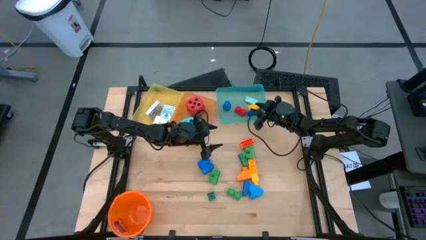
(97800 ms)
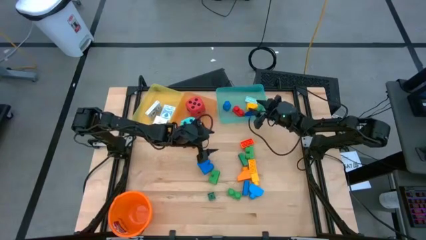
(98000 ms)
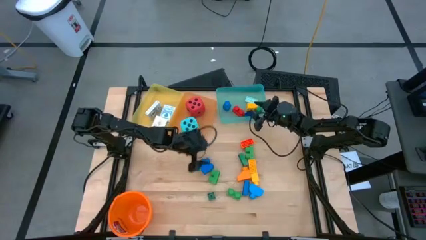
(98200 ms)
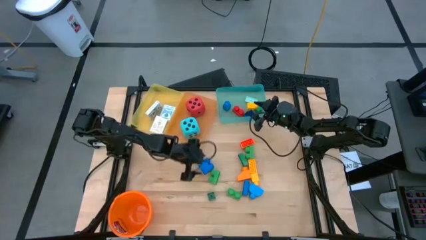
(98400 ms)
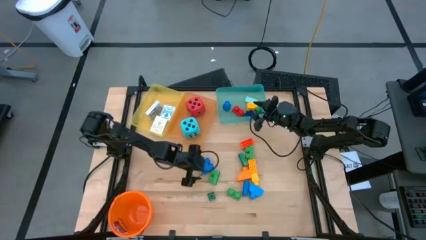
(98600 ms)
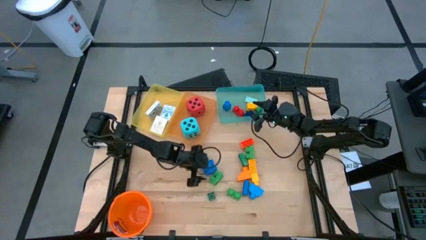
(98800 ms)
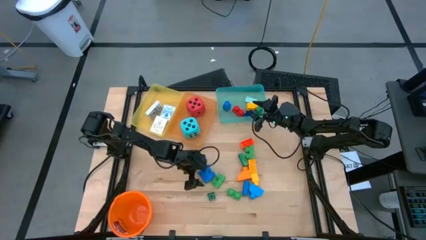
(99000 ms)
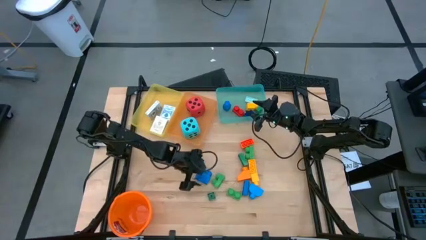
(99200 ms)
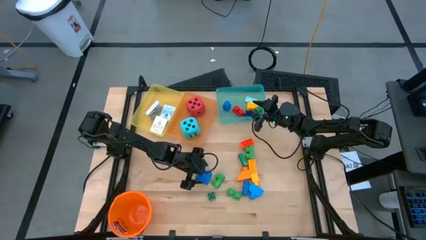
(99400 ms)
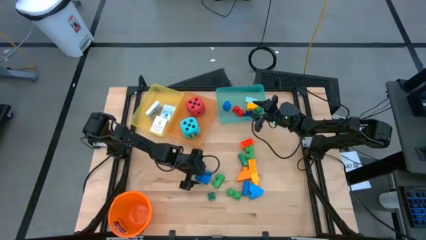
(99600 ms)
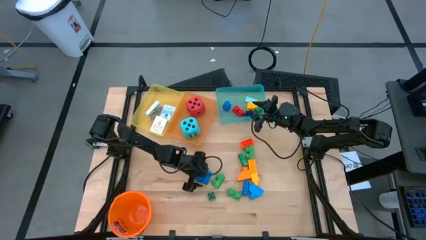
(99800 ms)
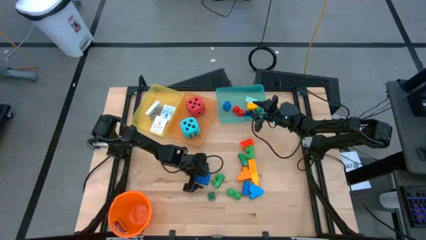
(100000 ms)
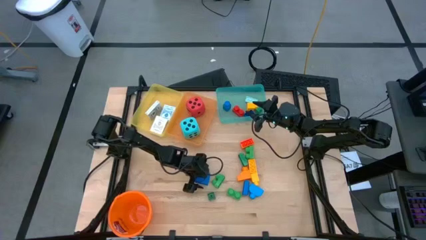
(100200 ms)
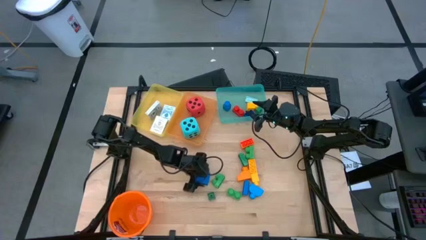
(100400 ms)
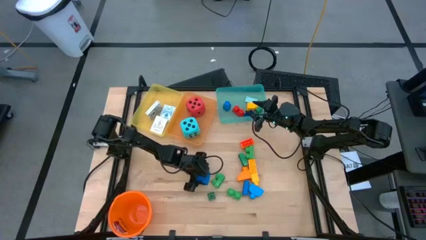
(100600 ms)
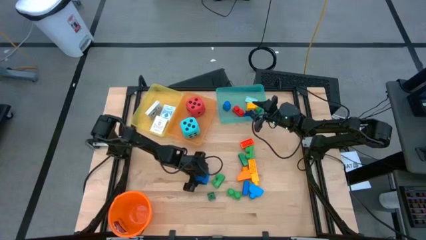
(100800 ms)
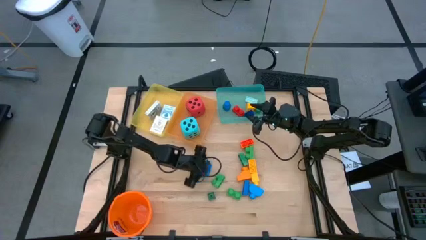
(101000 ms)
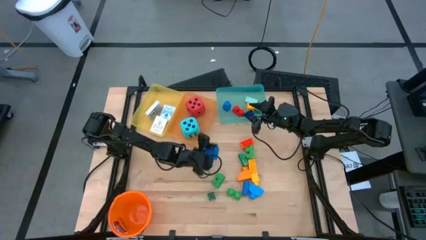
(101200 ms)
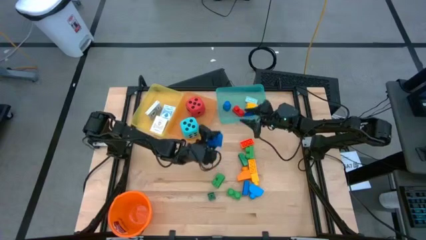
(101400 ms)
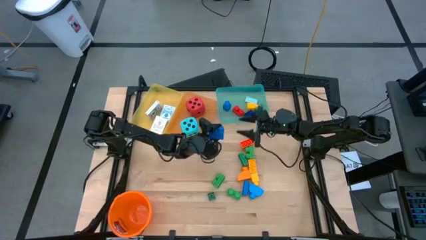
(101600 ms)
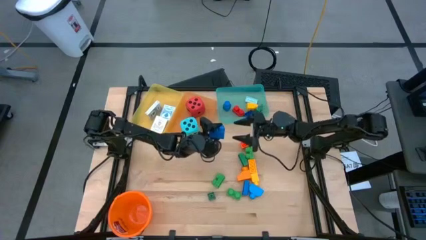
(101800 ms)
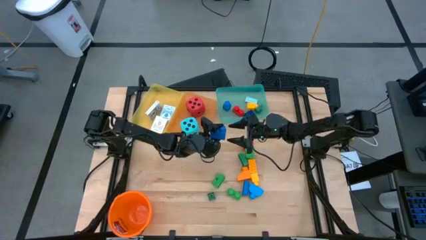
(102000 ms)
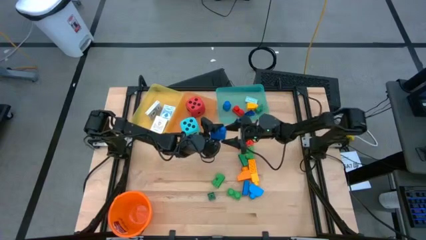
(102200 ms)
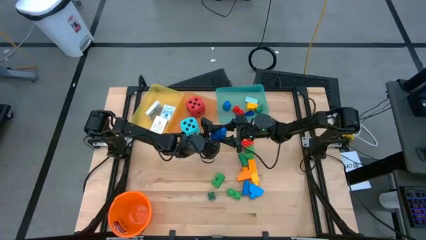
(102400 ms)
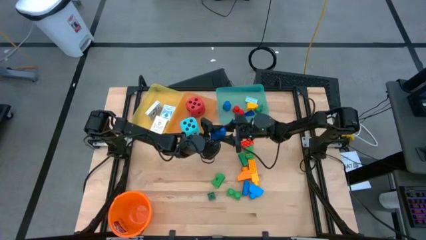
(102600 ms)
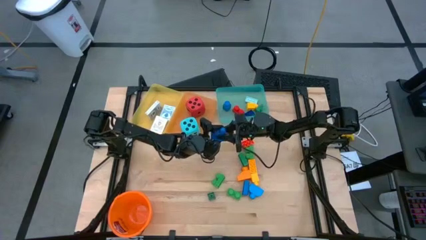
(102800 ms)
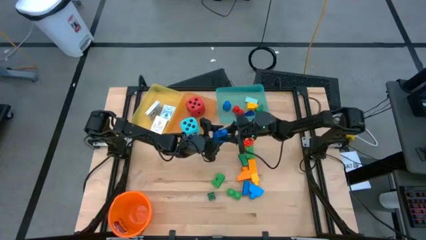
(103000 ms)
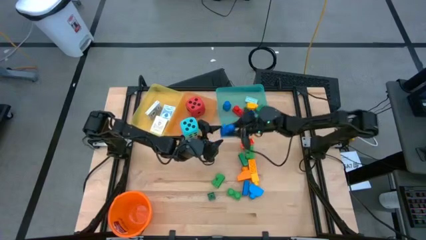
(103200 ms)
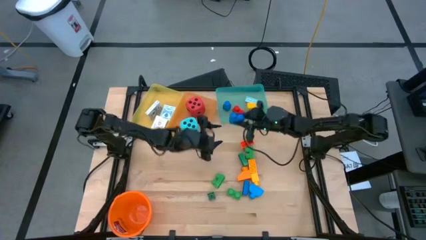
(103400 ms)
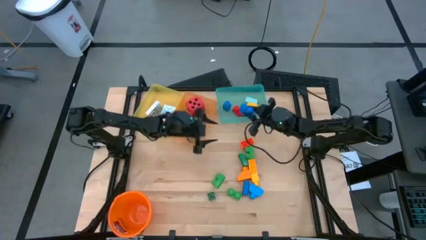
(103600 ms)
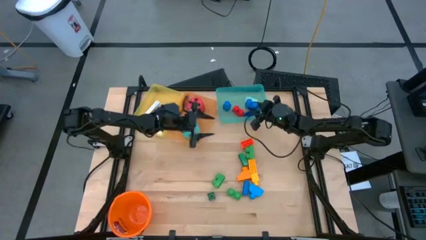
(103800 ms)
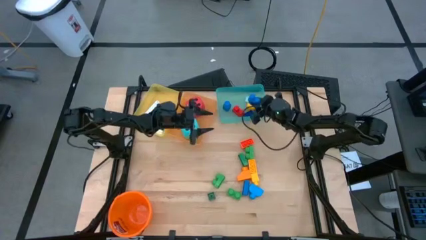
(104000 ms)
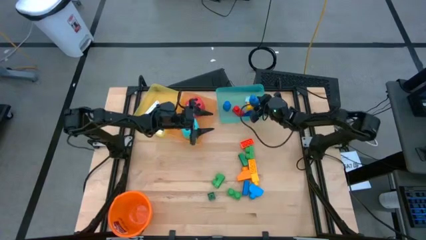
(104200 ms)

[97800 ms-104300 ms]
Task: Pick & Place Toys
Put the blue game piece into the blue bin

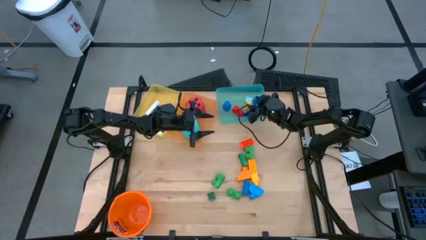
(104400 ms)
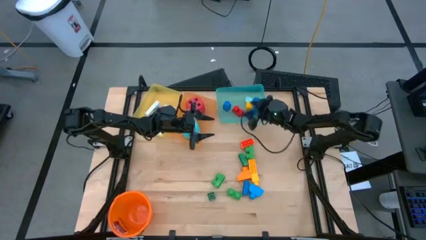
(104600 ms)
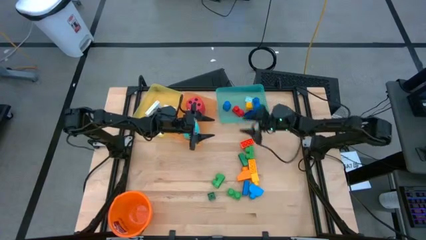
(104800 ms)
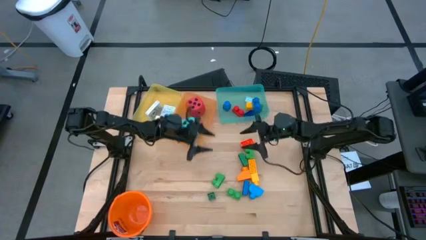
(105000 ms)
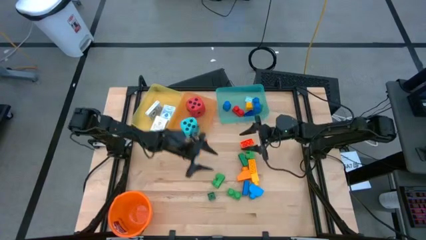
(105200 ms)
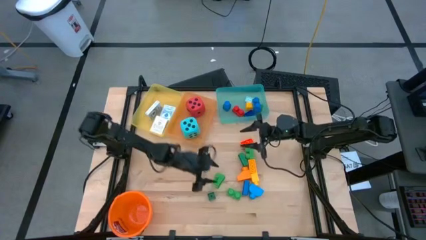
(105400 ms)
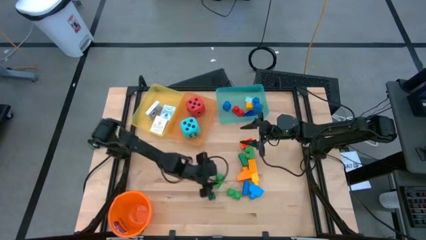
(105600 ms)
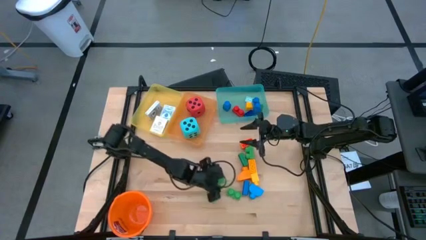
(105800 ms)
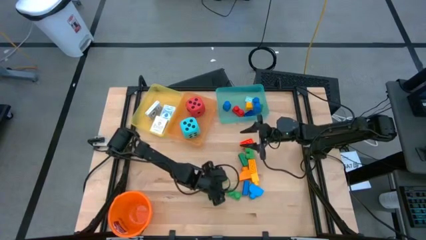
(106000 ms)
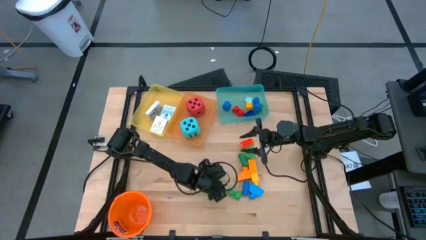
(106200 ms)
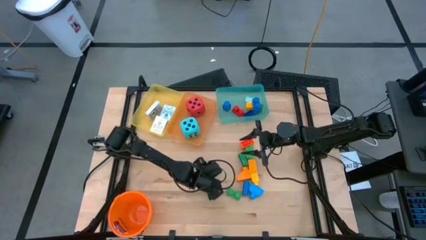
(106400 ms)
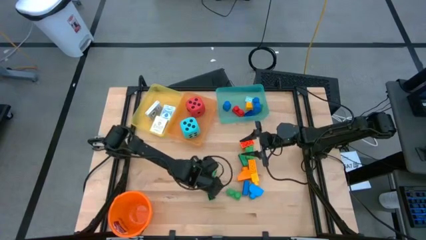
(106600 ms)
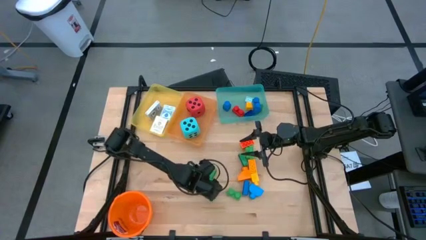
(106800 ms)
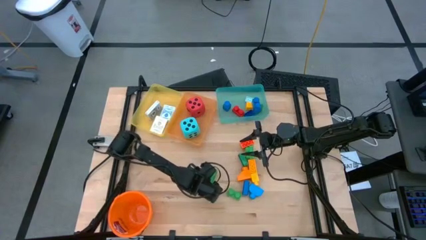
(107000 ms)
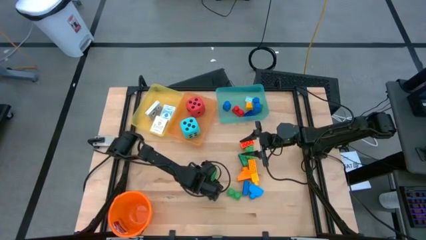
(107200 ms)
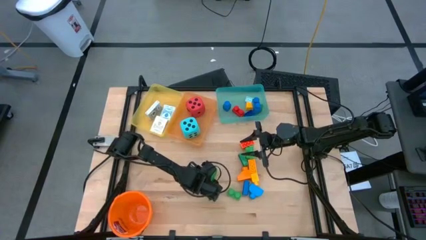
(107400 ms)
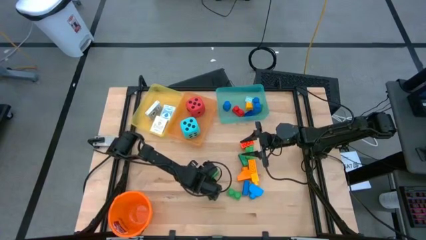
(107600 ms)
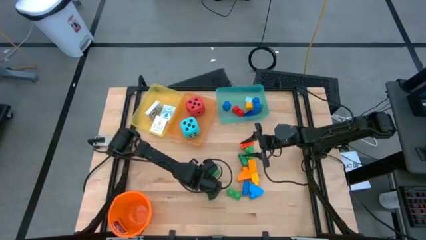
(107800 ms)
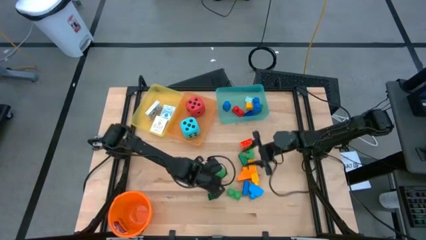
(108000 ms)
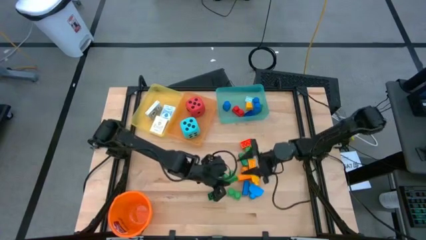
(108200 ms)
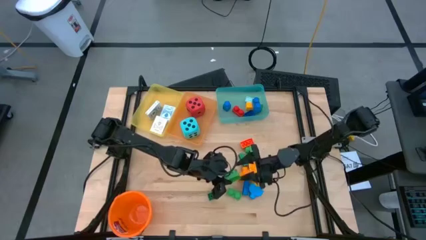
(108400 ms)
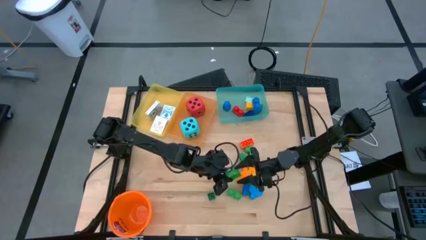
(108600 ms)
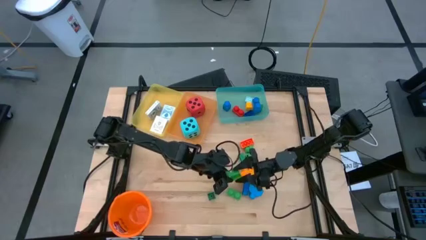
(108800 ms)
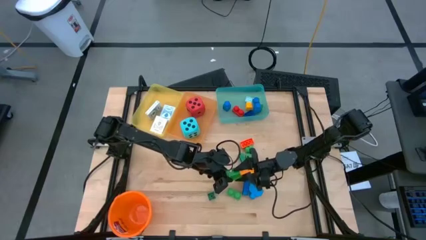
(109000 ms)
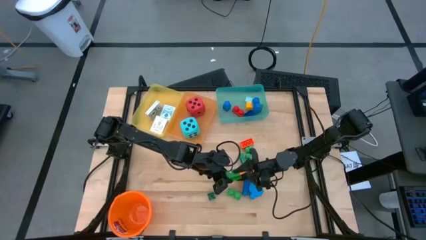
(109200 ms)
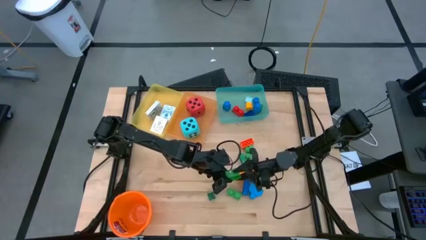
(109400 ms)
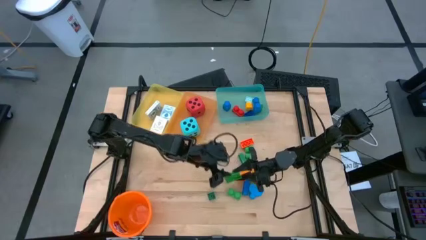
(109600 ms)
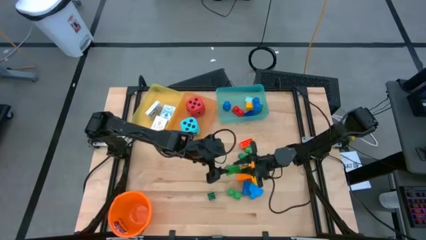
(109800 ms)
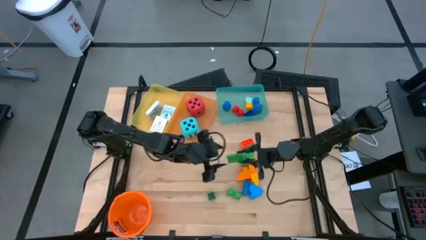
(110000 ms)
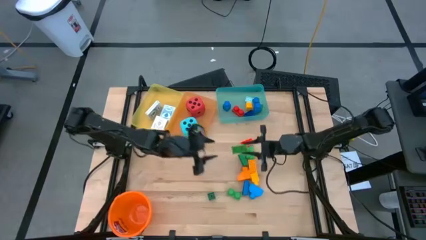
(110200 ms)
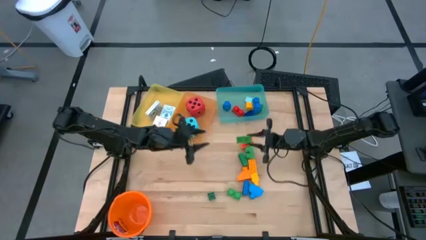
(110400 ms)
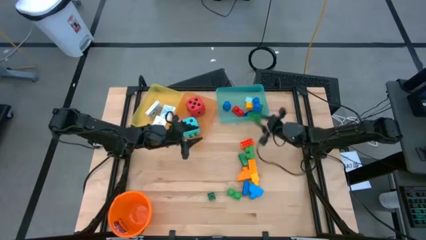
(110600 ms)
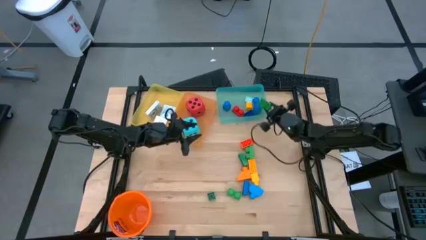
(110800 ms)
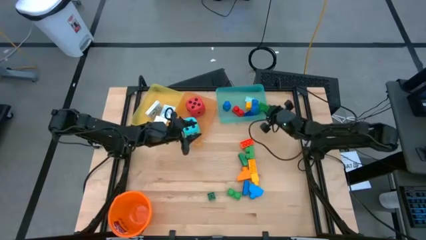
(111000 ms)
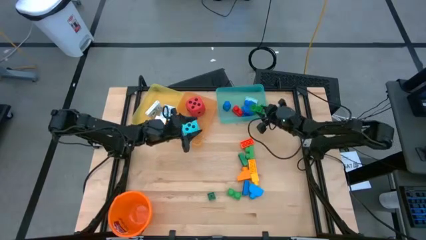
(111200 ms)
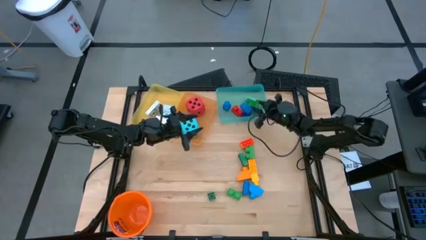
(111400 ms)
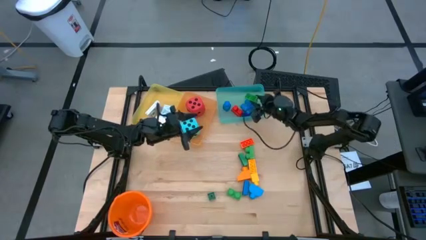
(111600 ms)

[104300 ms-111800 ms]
Put the middle green game piece into the blue bin

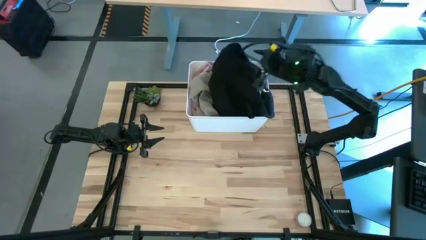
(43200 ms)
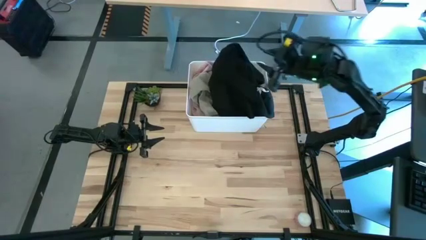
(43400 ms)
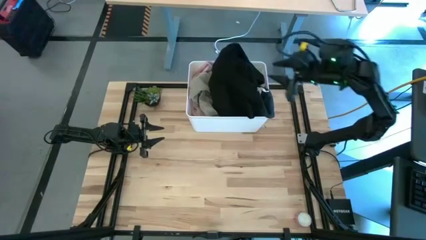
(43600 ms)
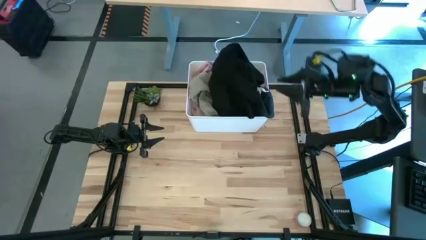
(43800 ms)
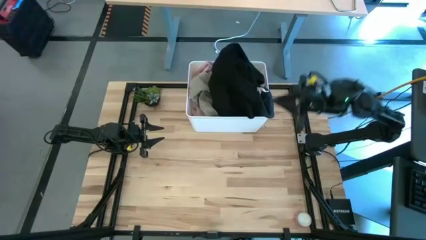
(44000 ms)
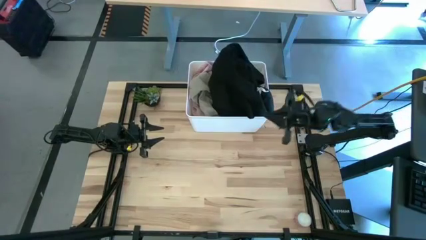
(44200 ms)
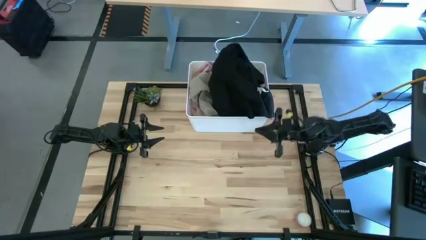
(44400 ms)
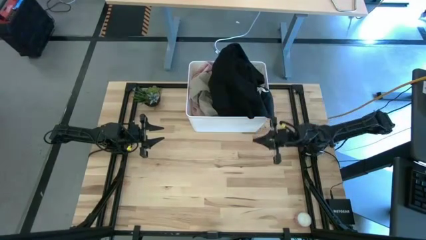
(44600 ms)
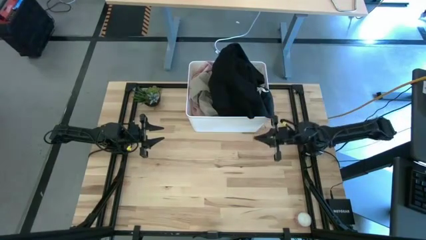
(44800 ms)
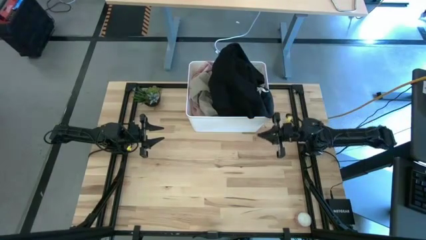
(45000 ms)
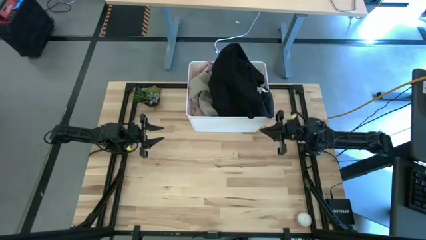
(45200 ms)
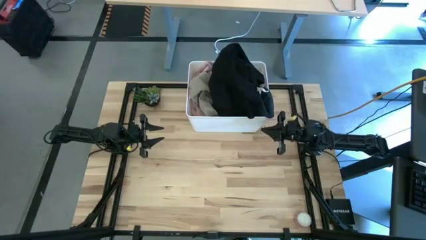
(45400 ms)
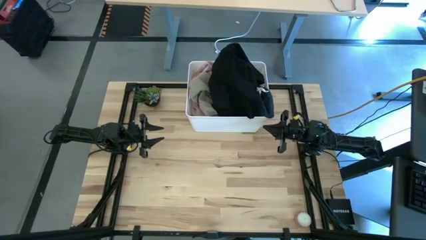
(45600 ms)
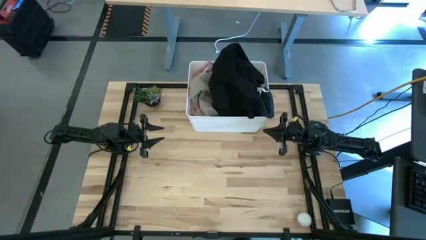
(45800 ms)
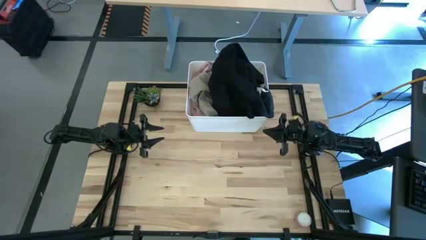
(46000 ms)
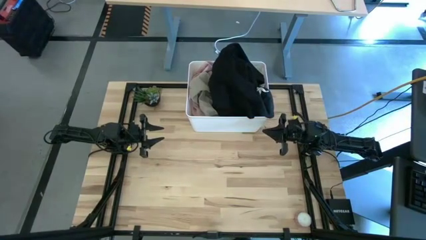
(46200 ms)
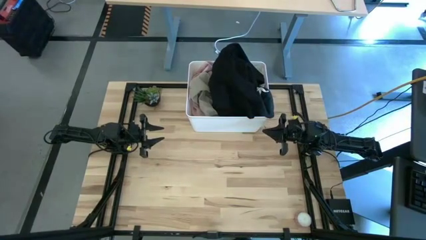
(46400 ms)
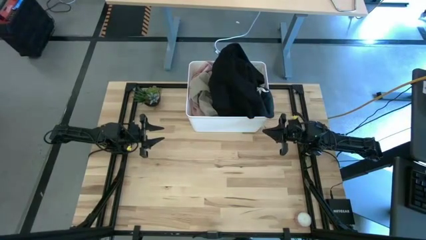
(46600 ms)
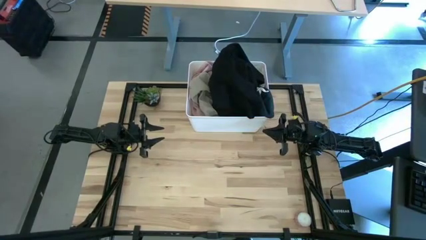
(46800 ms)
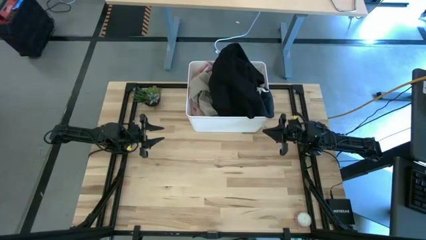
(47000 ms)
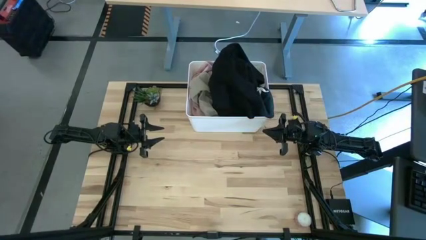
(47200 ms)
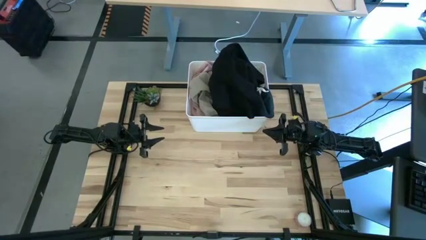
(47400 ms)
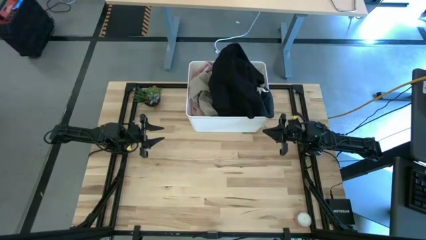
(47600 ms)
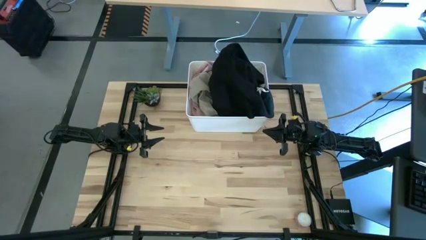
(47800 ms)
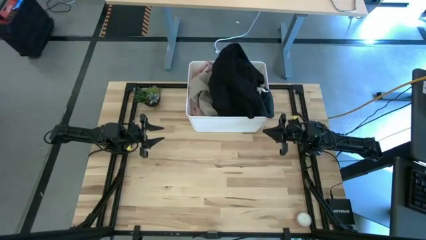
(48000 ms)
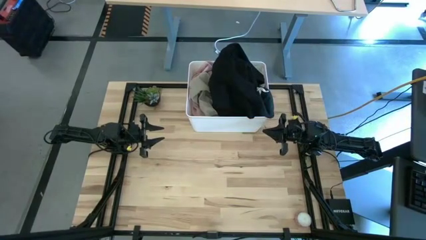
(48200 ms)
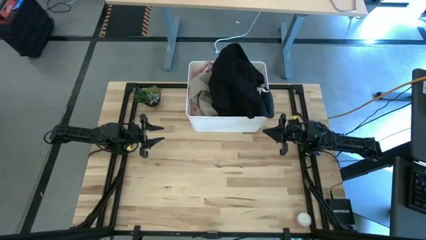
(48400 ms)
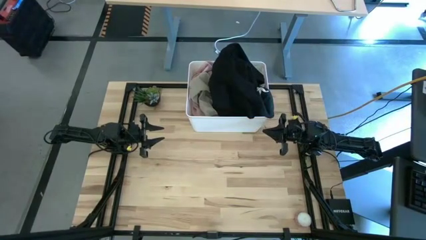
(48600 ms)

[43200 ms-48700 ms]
Task: Sort clothes
Return to Home Position
